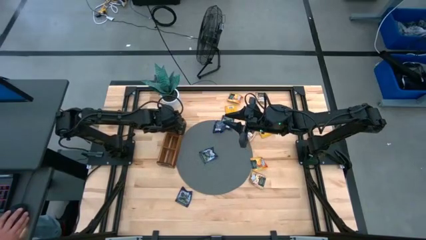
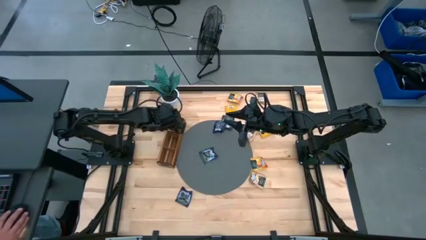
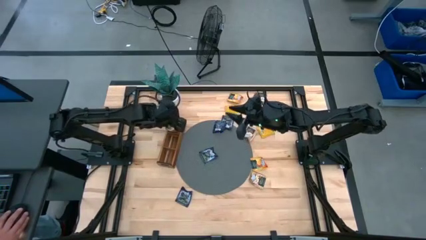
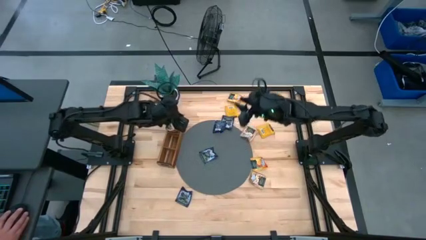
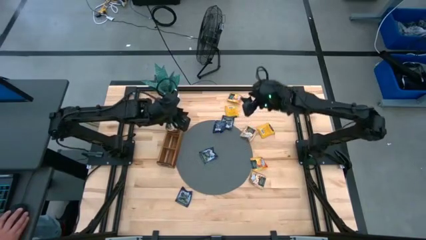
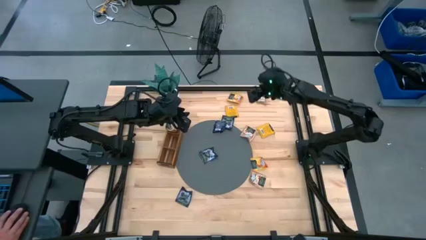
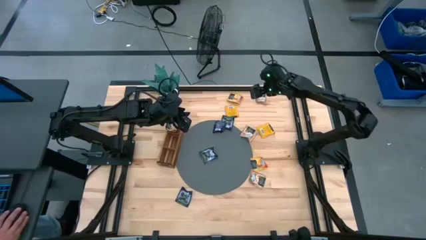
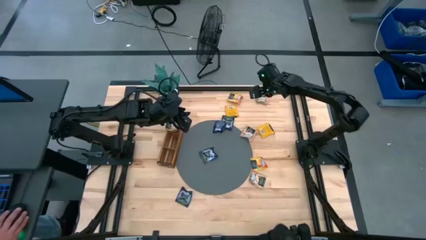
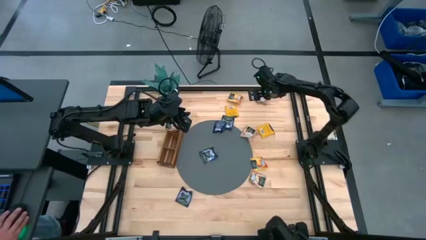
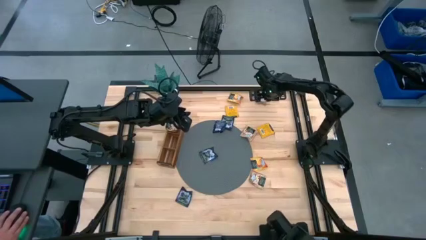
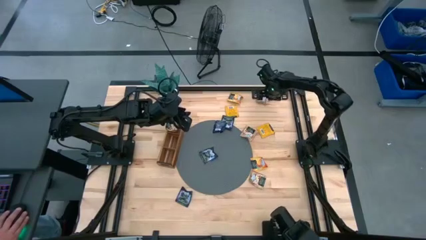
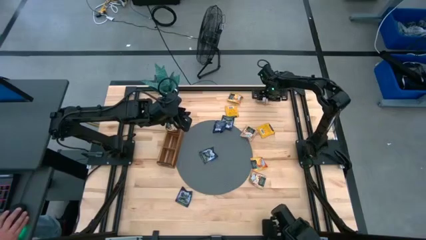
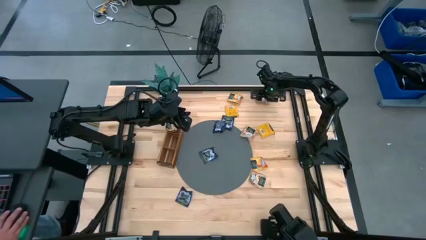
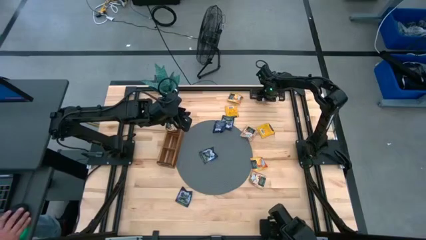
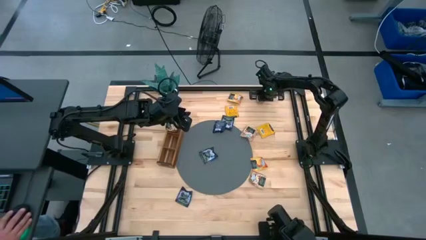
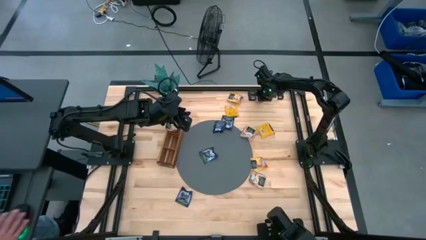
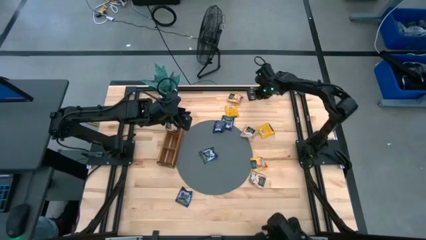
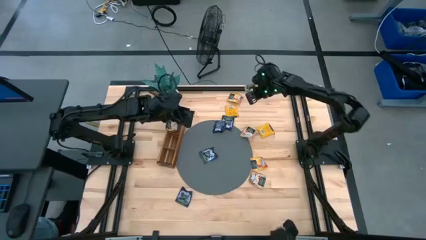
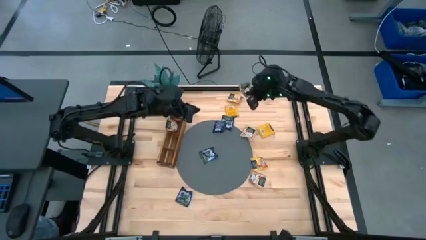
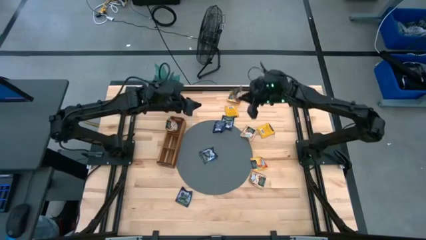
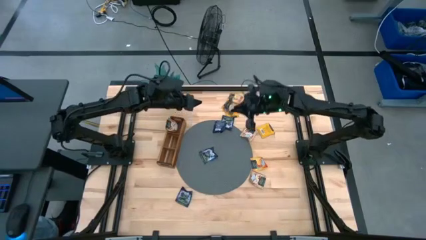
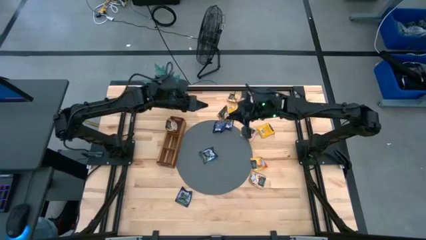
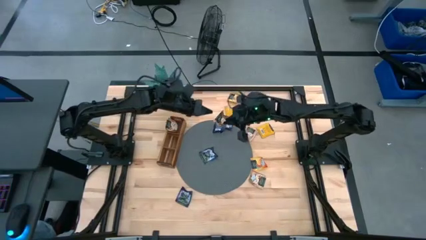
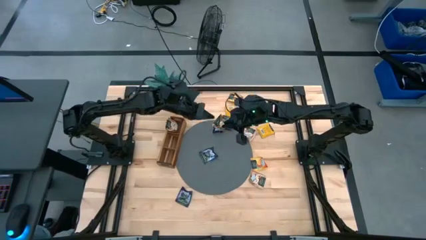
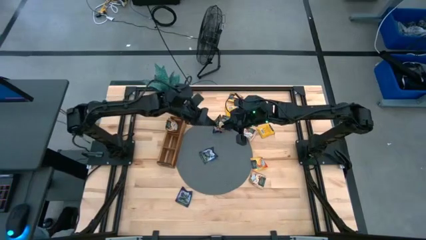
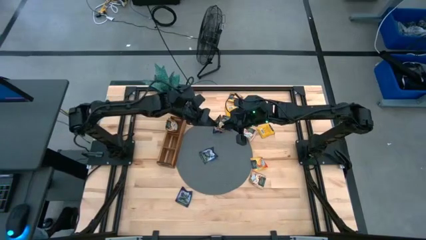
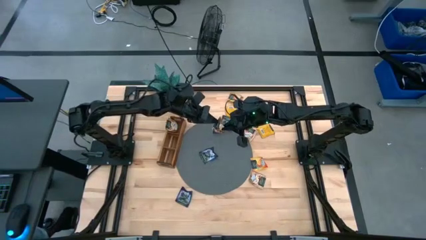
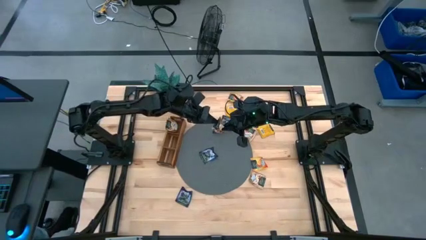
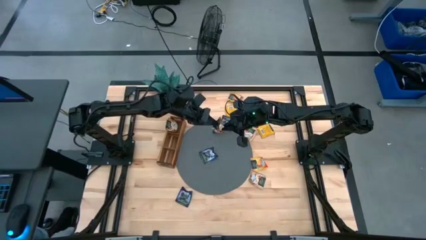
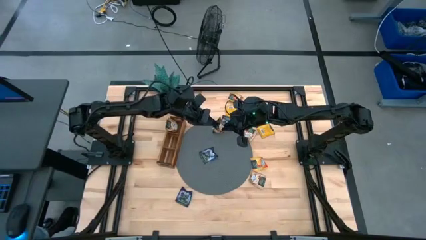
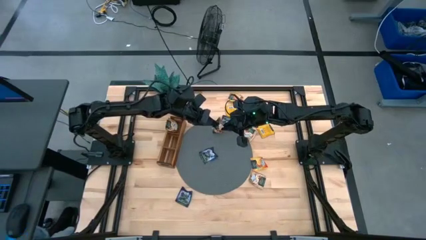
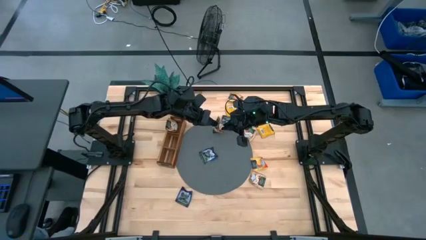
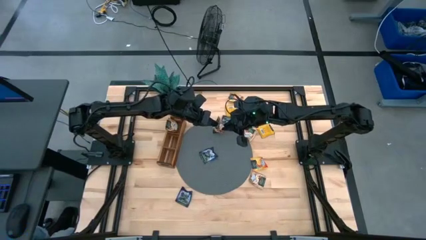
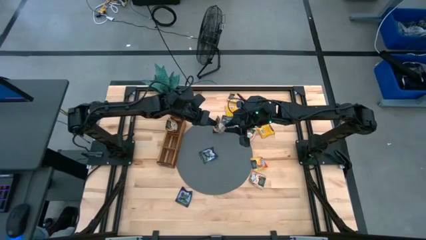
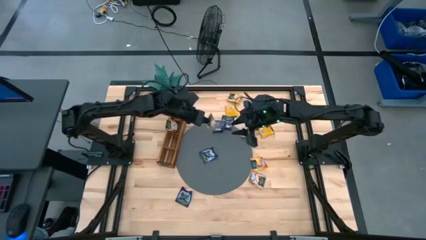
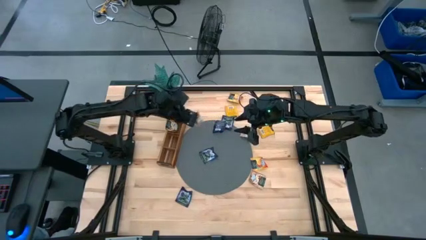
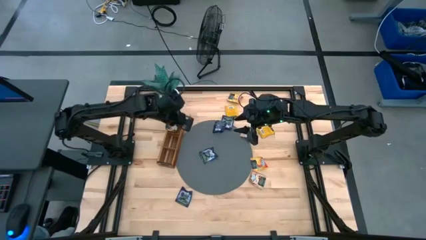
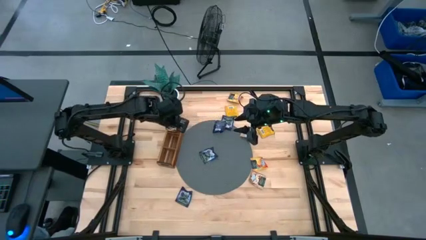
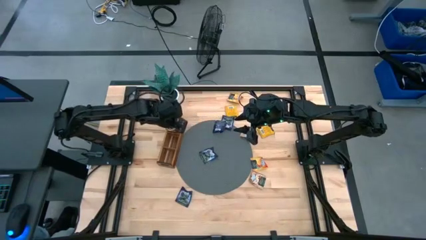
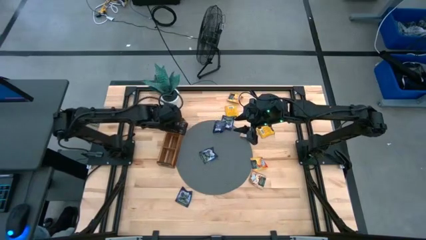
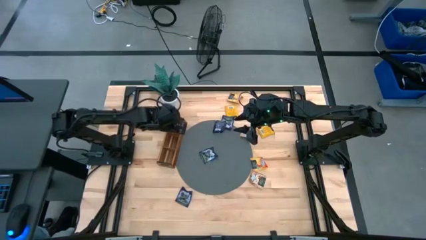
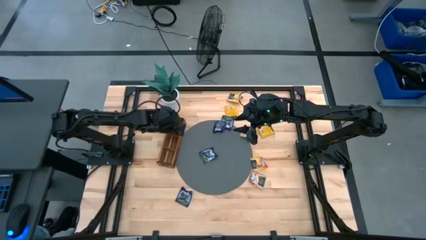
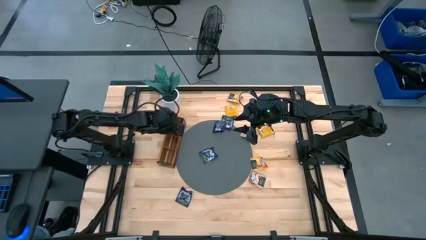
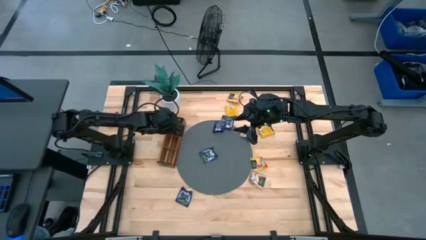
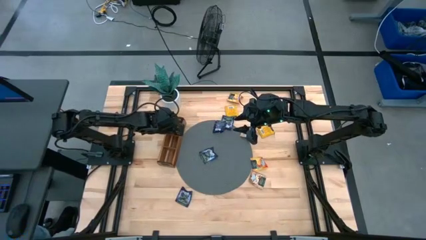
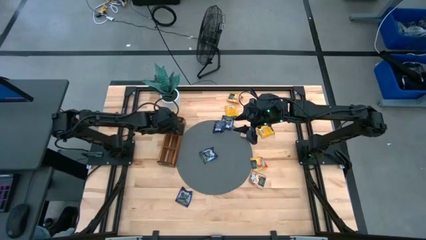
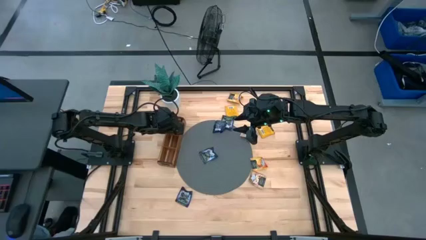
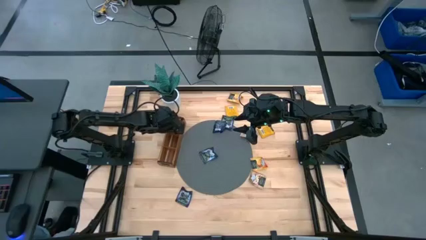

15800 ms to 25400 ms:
Task: Pick & Place Tea
Put the brown tea bag into the top section of the wooden organizer

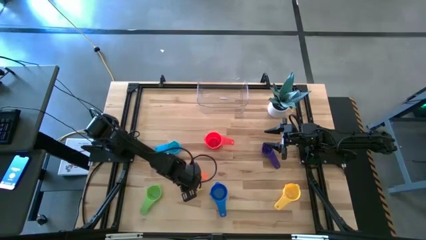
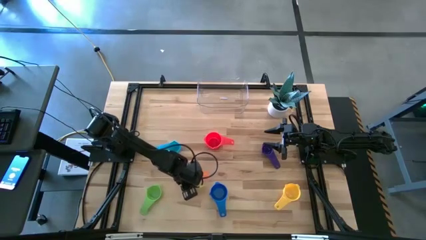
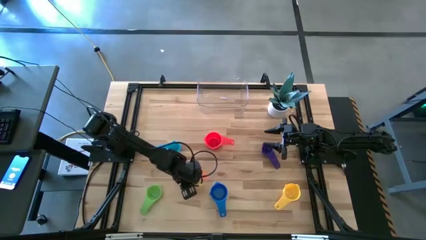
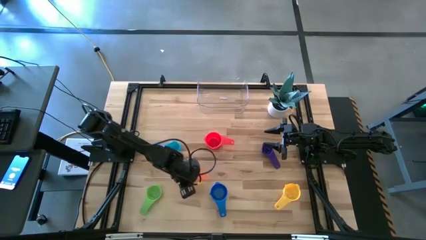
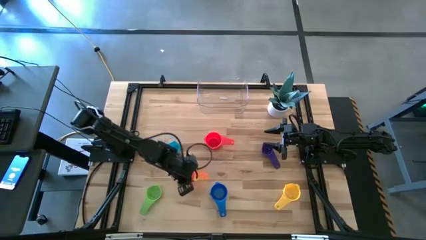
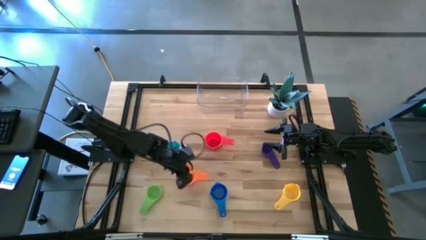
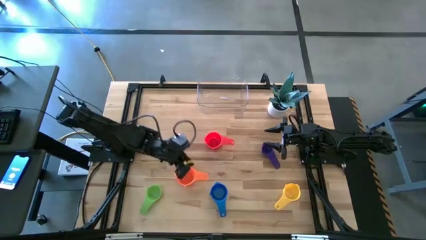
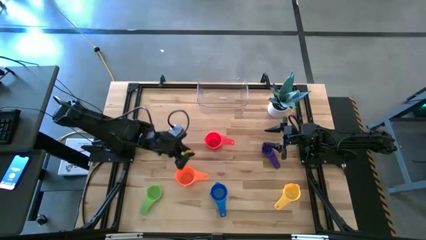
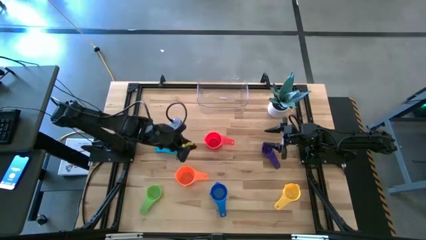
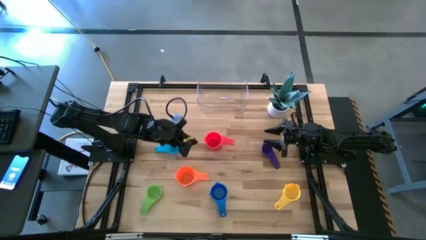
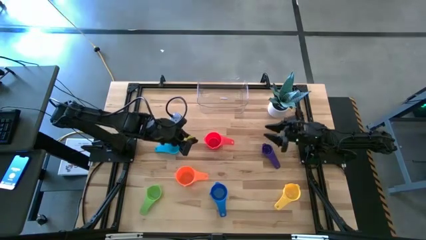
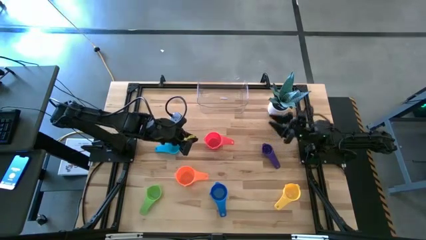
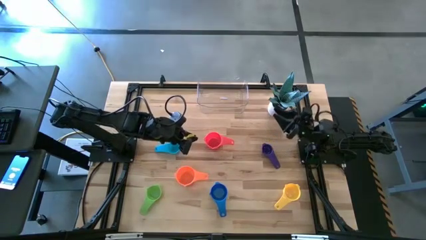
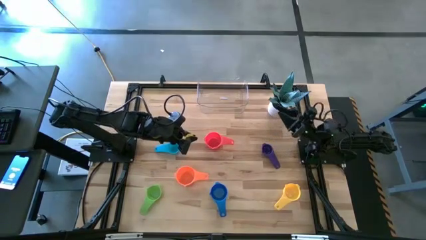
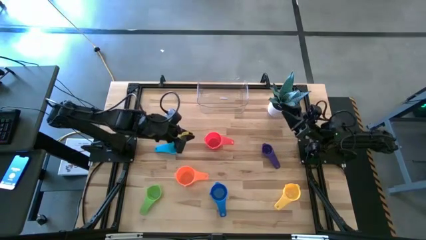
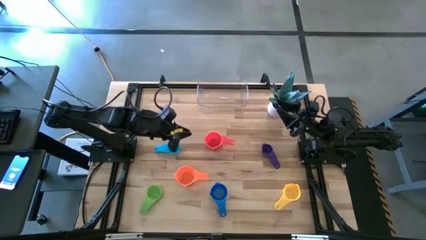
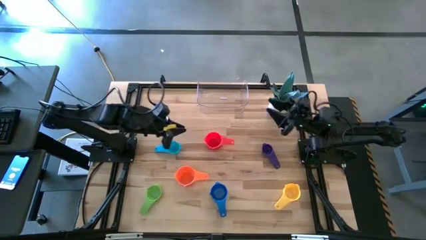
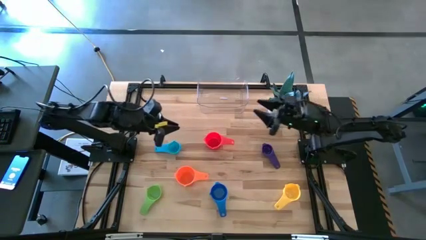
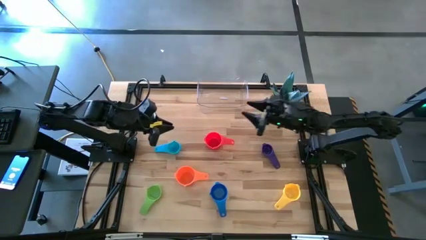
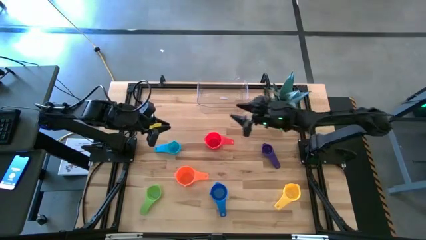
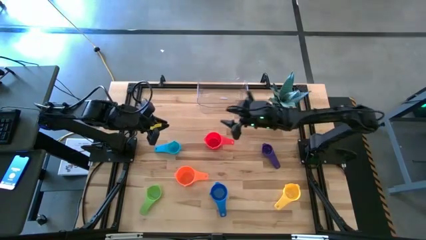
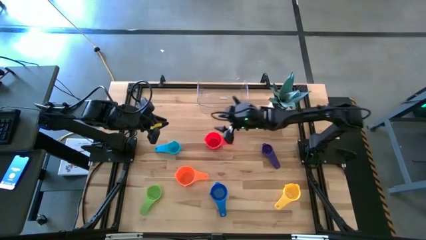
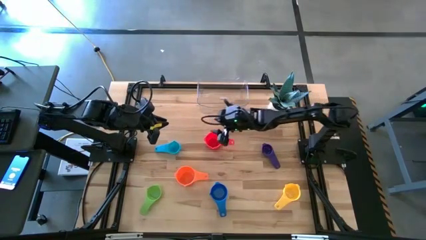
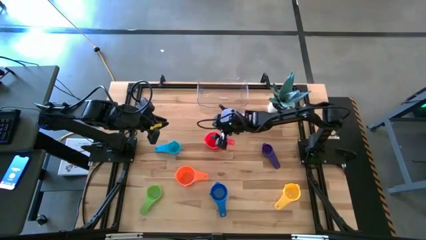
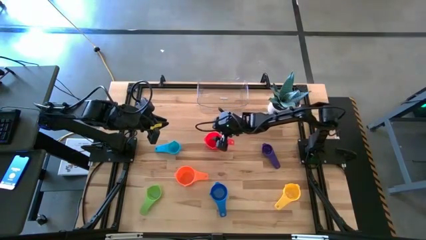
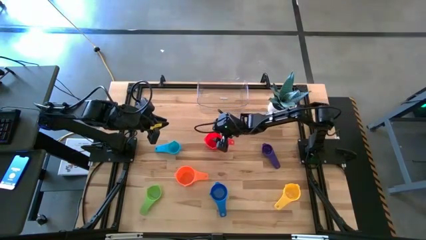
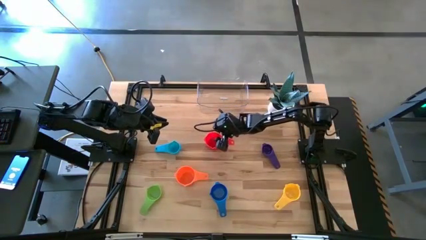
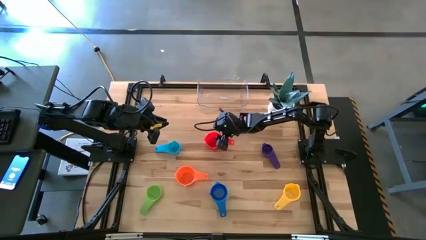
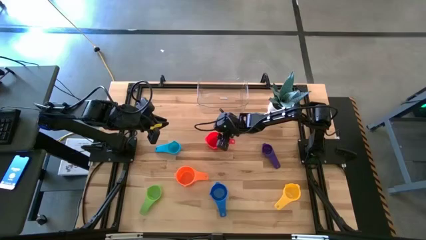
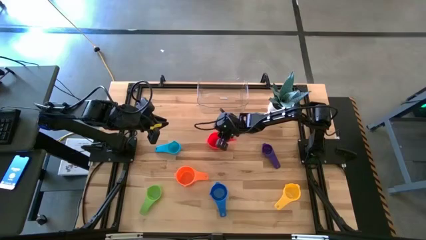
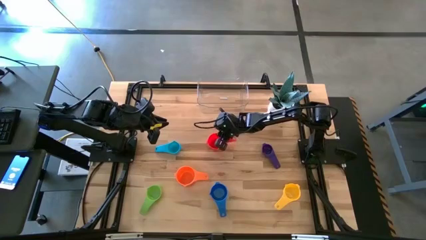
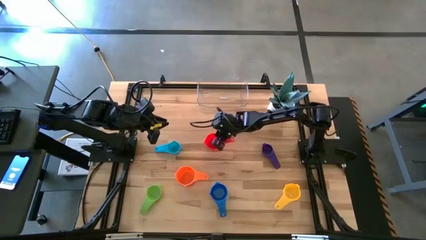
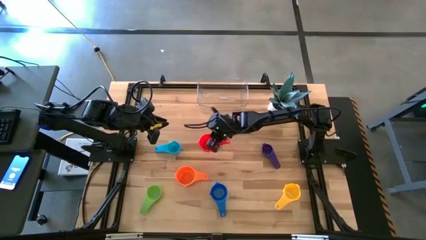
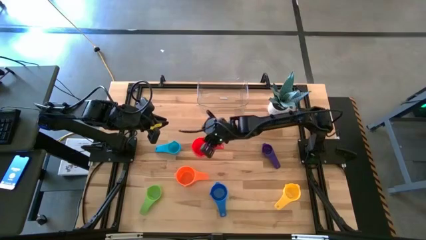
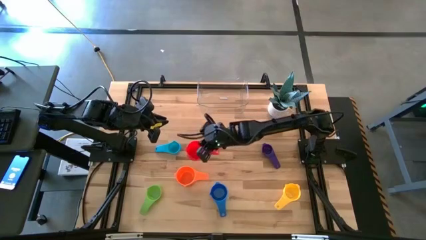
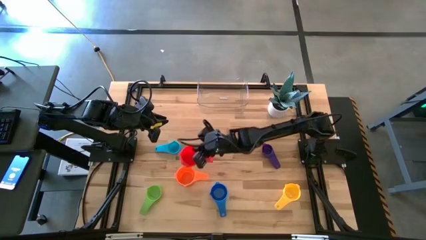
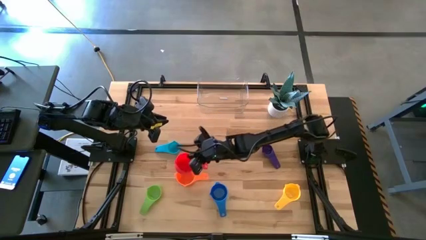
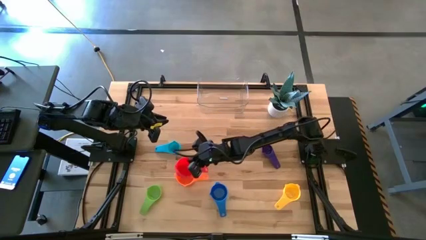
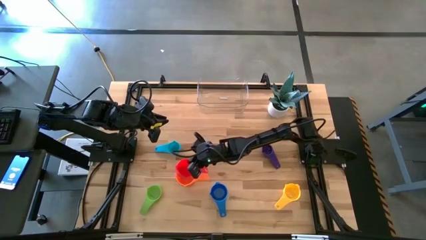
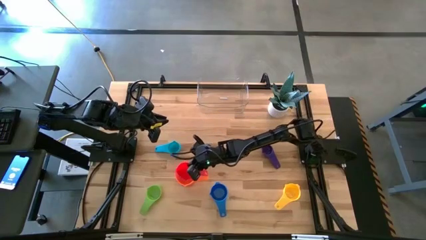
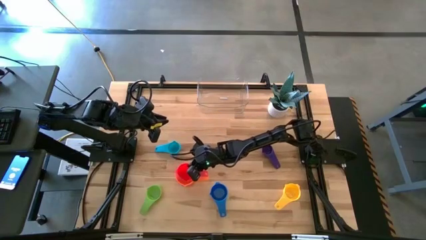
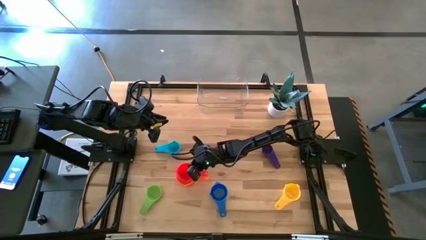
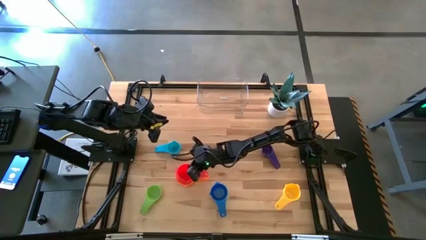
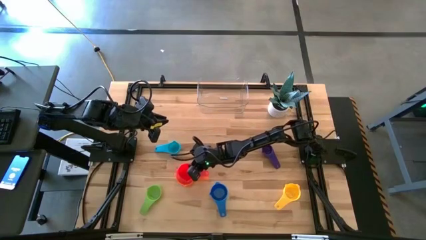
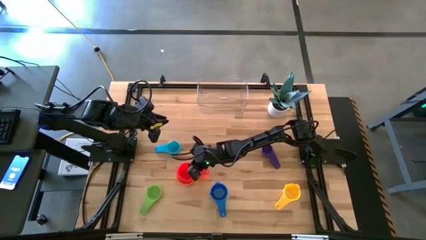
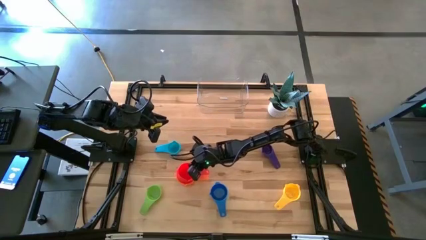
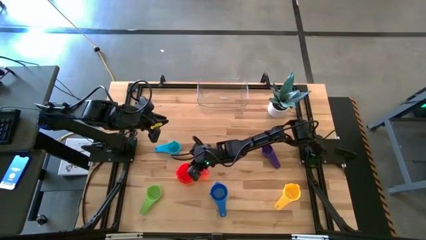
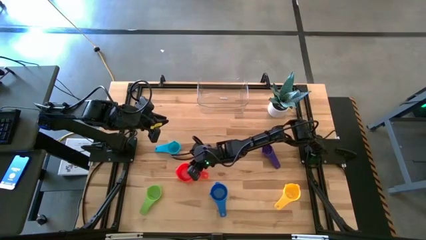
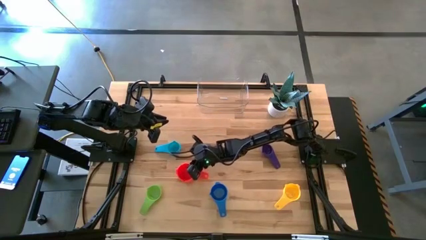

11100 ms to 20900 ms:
Task: Nest measuring cups in basket
Stack the red measuring cup on top of the orange measuring cup
